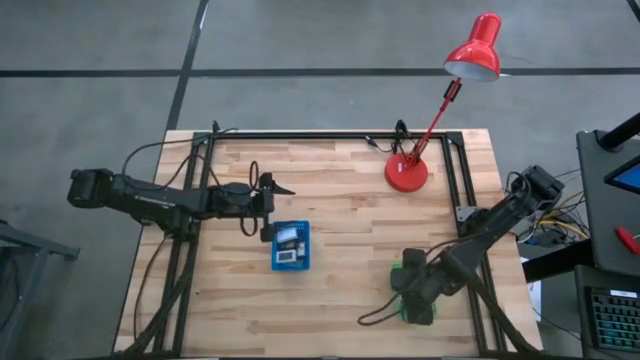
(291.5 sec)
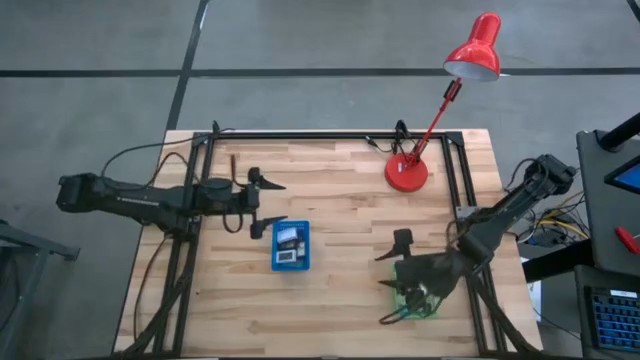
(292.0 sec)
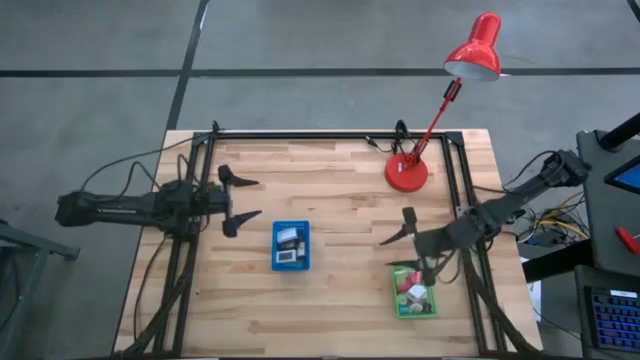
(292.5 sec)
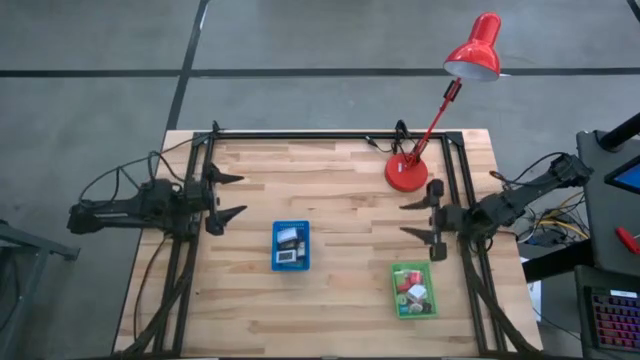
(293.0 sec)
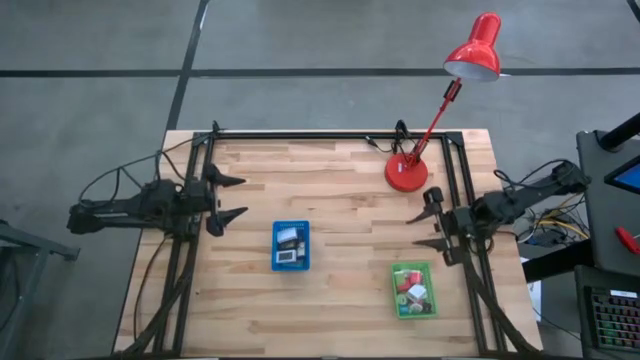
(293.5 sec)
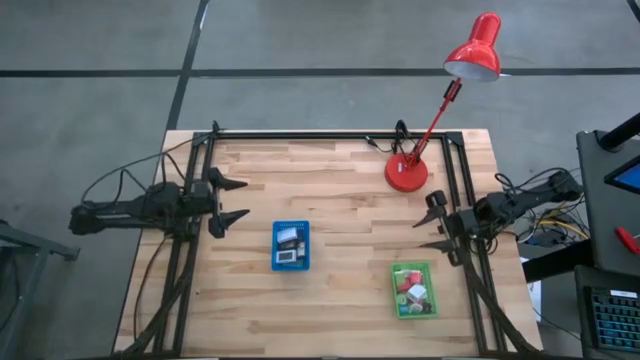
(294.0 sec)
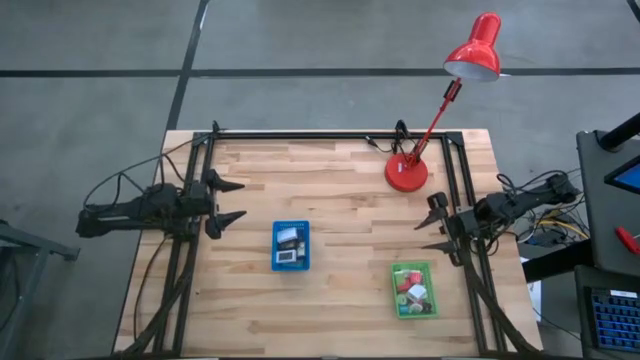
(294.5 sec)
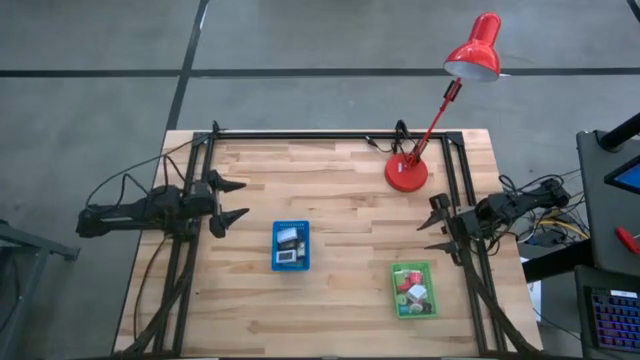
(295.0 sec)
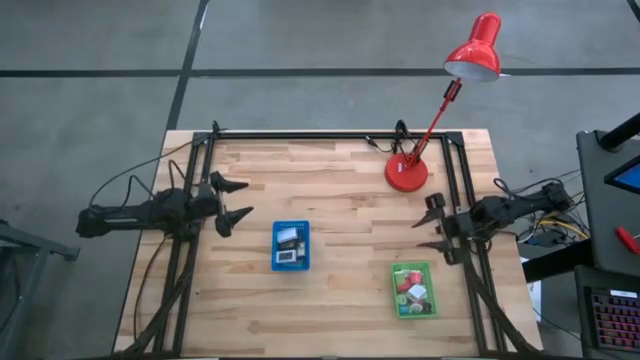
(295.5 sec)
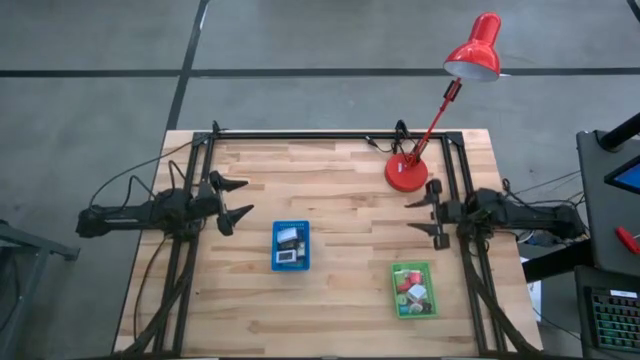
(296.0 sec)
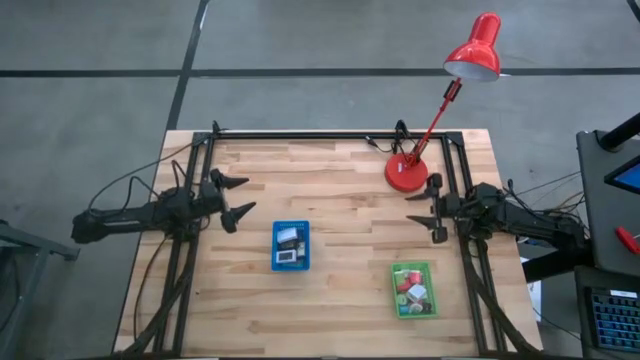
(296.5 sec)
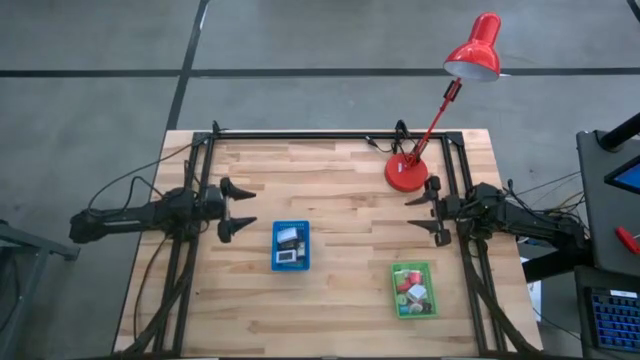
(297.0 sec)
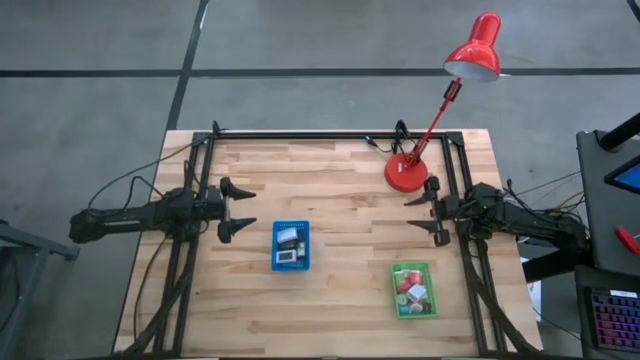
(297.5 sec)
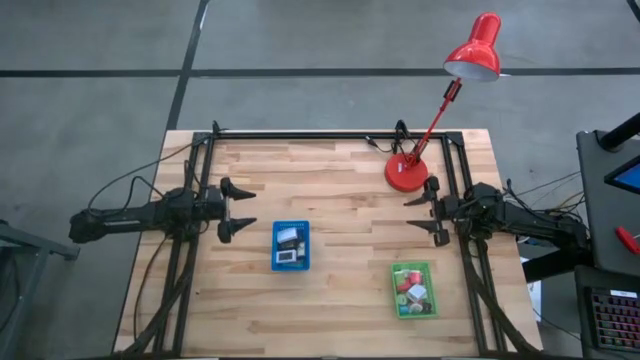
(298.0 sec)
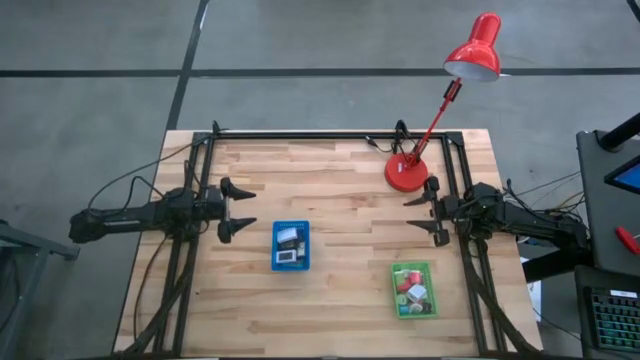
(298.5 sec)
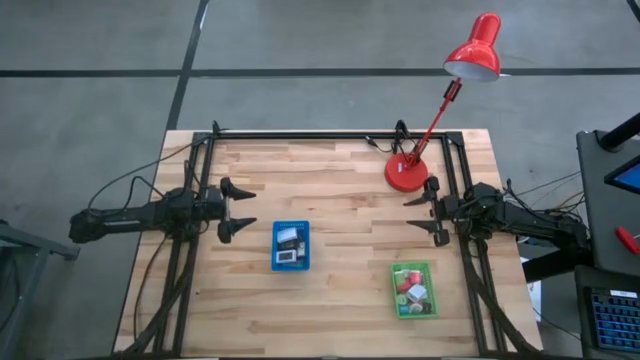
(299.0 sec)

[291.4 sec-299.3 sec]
Task: Pick & Place Office items
Return to Home Position

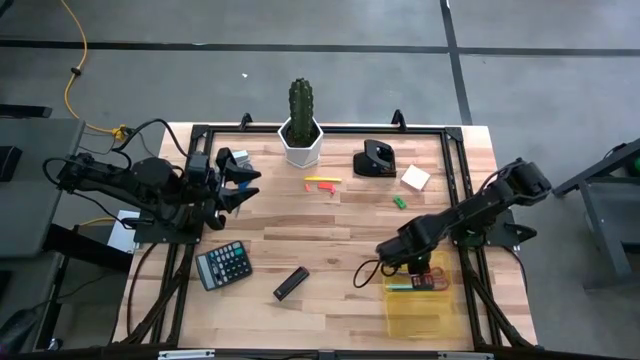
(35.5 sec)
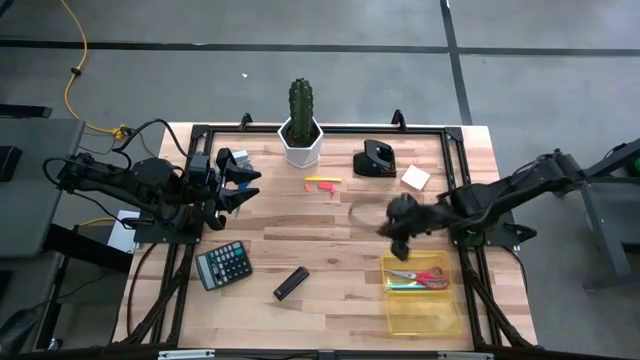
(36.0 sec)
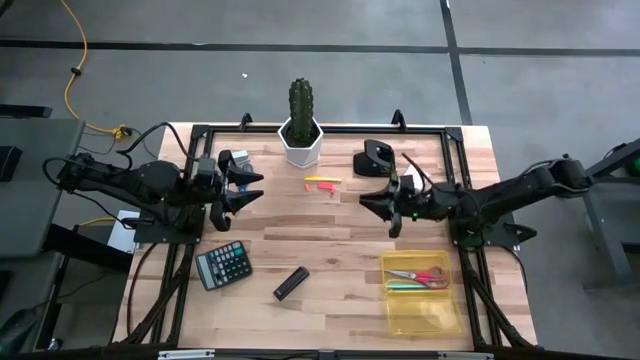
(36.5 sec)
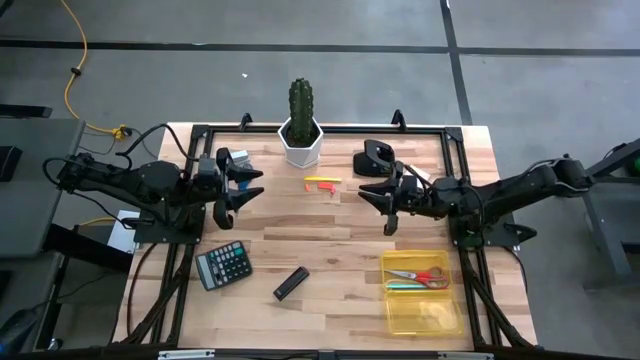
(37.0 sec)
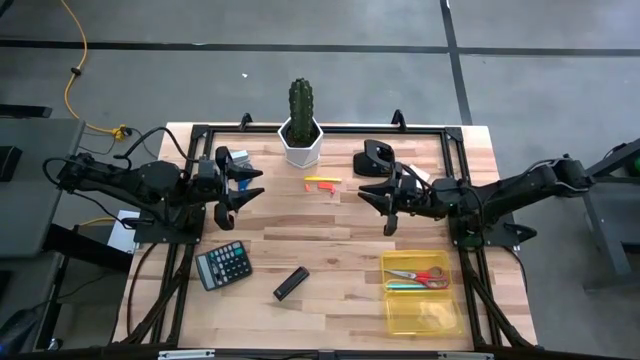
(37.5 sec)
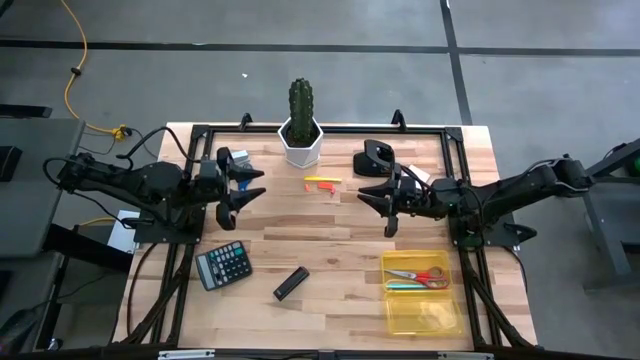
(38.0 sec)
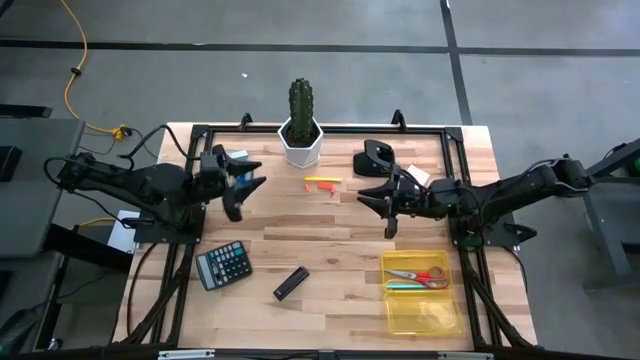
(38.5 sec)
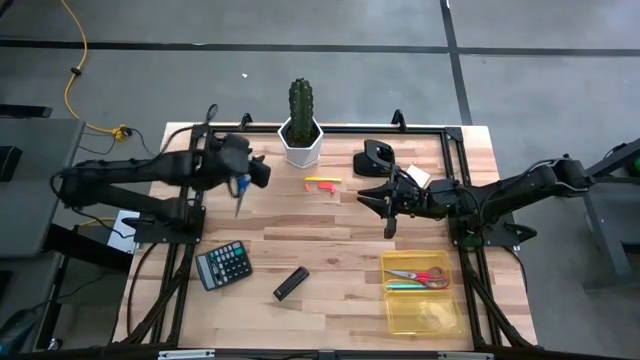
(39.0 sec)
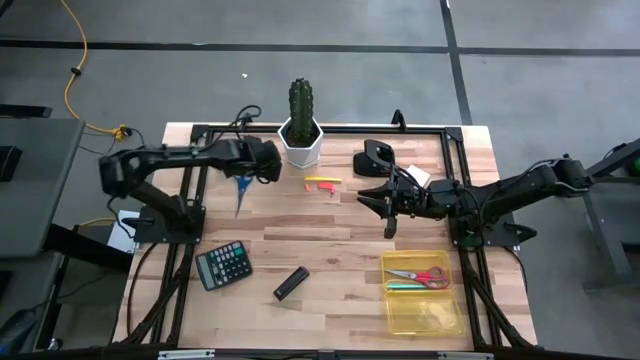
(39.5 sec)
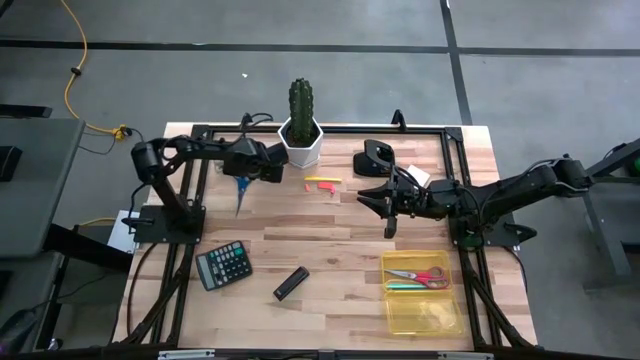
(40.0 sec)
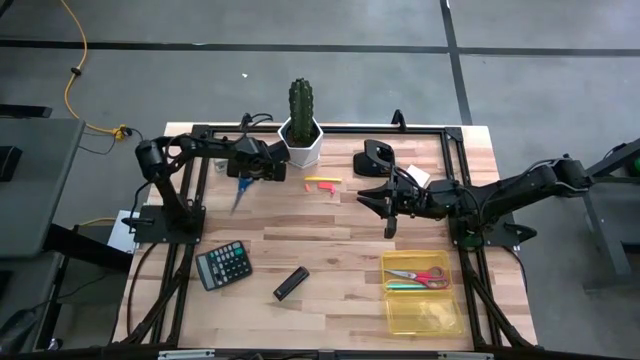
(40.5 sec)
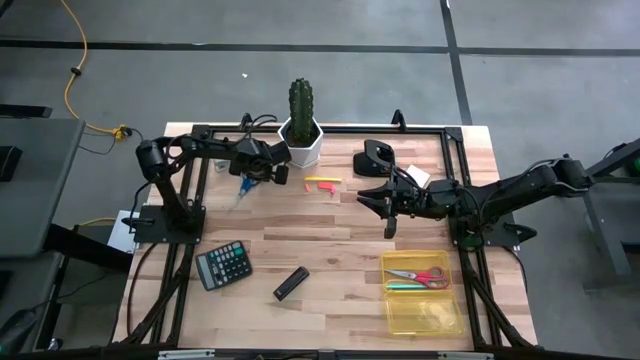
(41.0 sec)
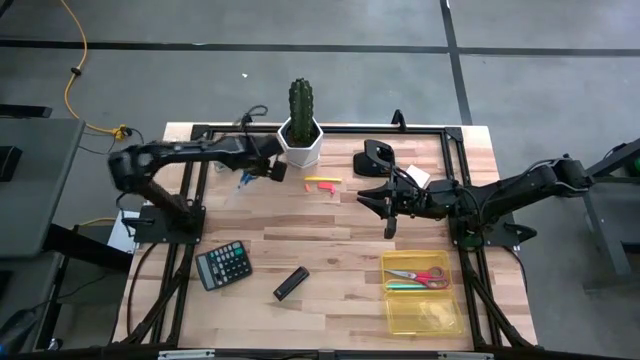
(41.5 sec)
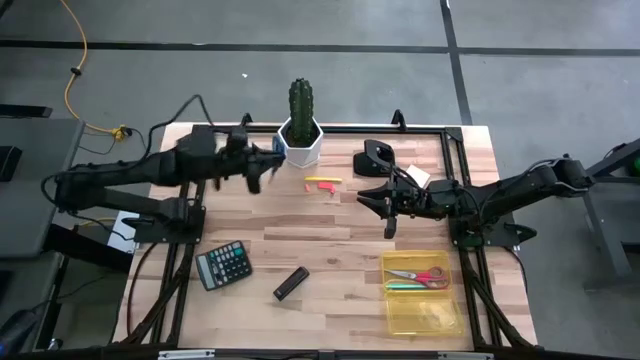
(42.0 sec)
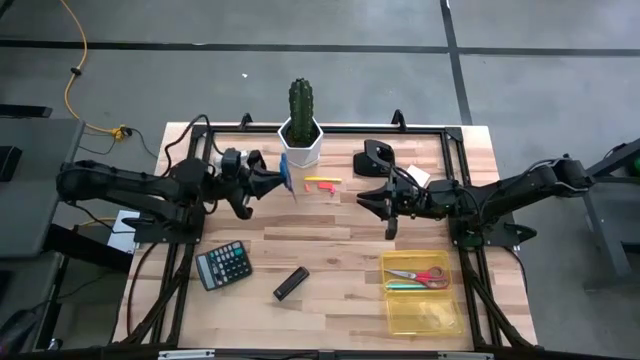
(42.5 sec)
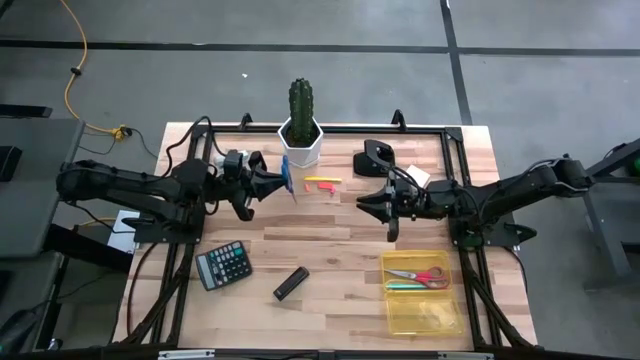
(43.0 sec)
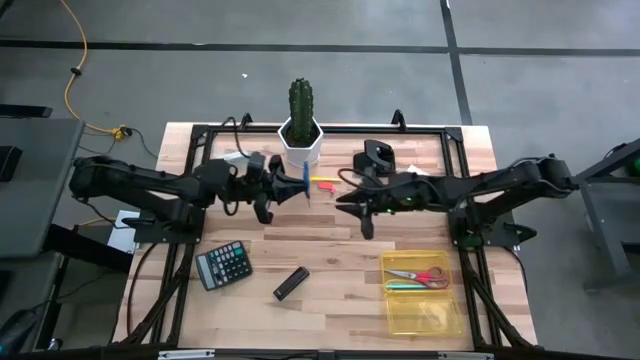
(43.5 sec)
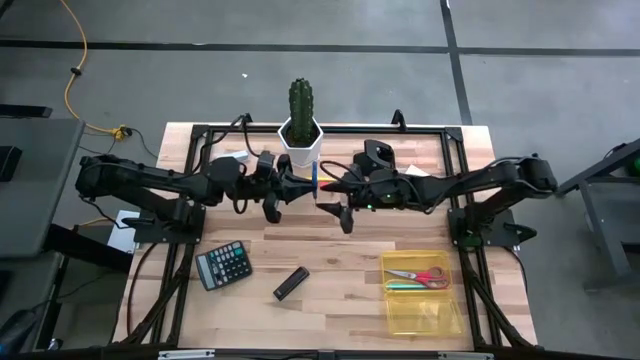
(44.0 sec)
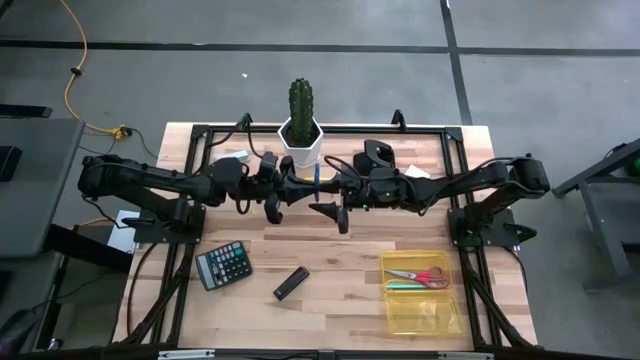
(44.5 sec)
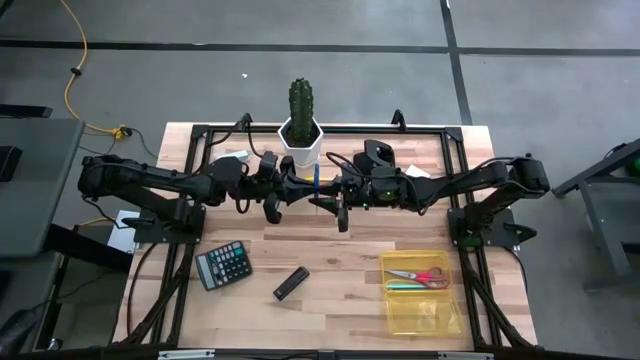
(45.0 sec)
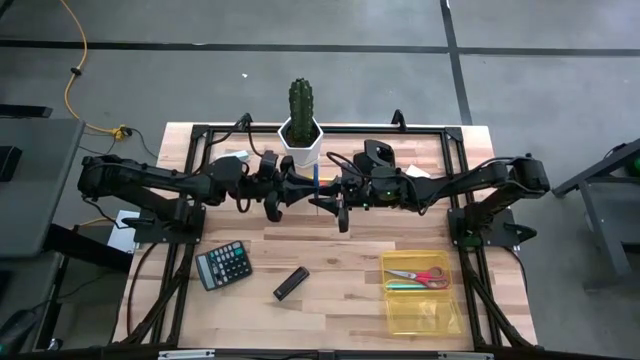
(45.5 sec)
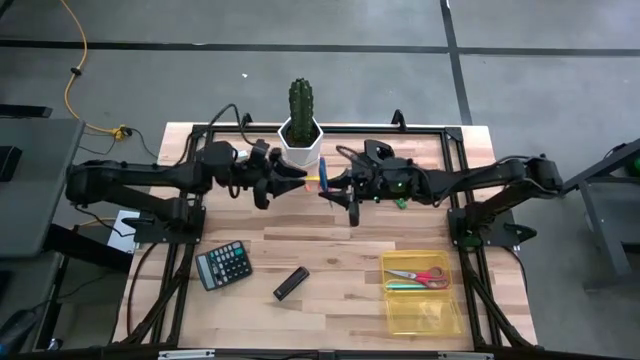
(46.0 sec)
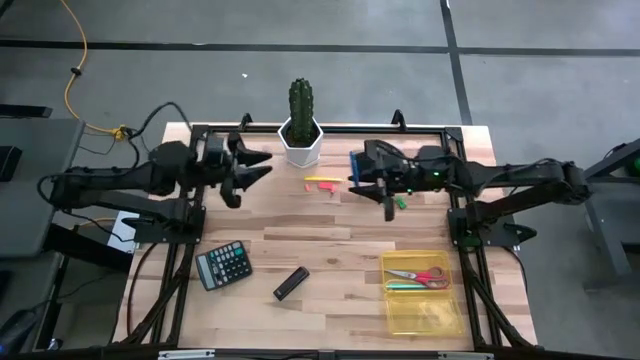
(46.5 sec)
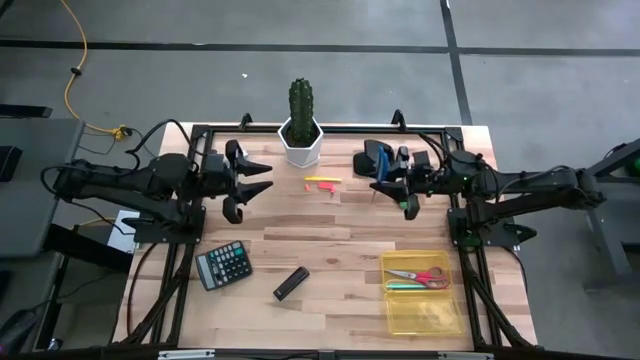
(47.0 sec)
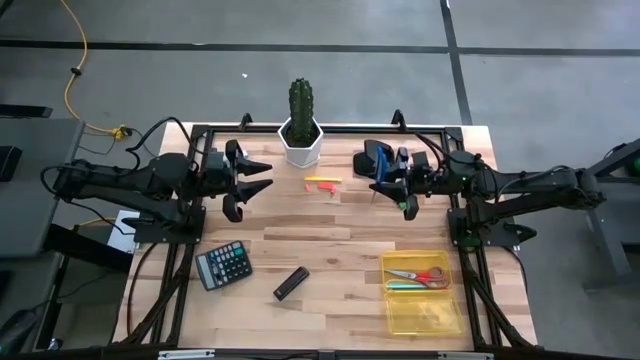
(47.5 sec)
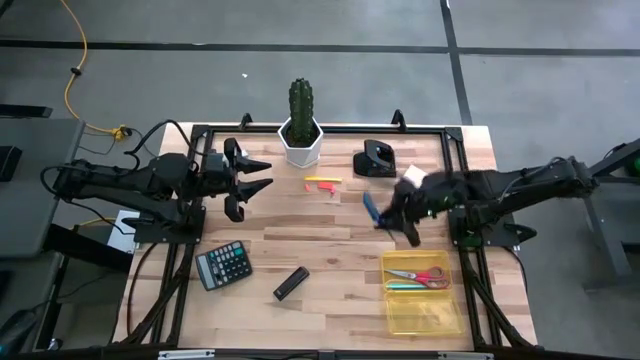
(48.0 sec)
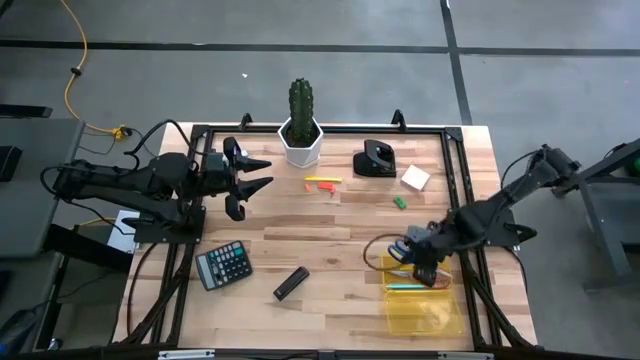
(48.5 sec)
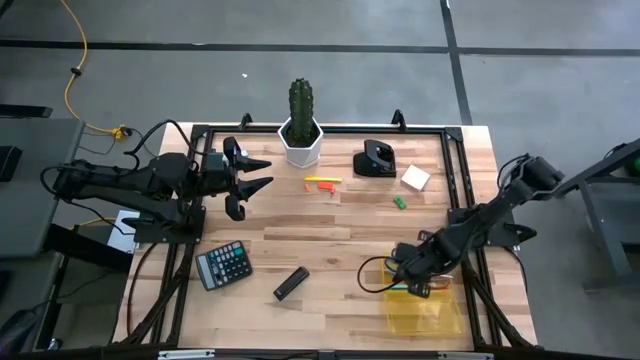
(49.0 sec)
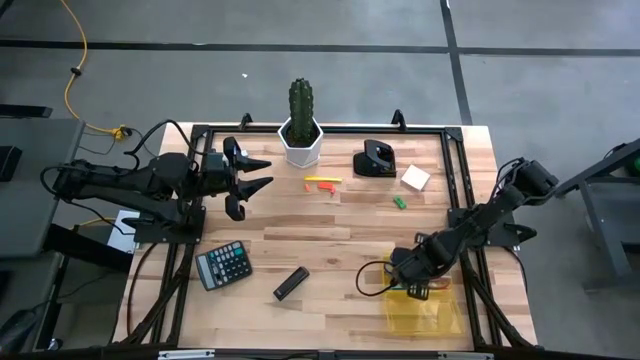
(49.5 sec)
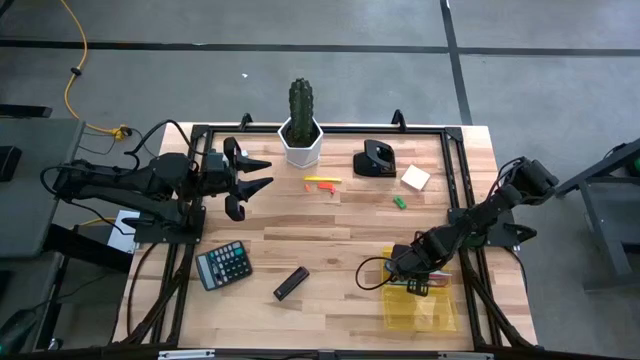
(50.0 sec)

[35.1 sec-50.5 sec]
Task: Pack school essentials
Put the blue scissors on the yellow supply box
